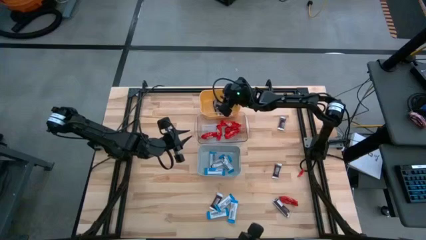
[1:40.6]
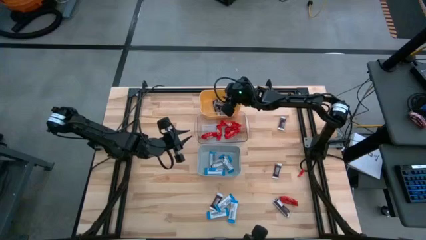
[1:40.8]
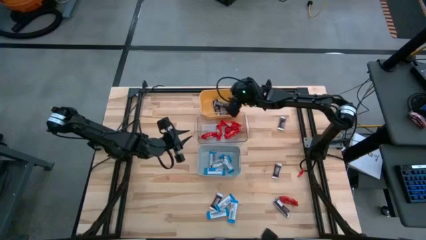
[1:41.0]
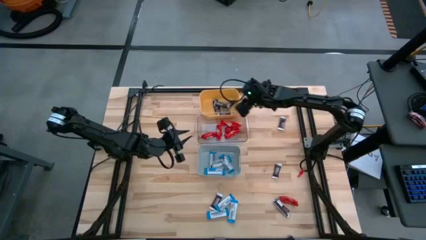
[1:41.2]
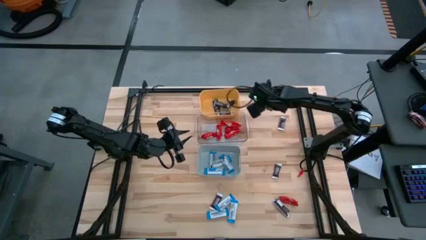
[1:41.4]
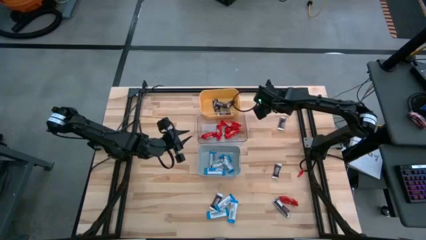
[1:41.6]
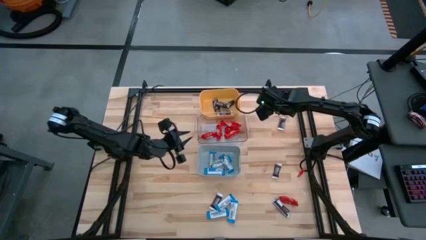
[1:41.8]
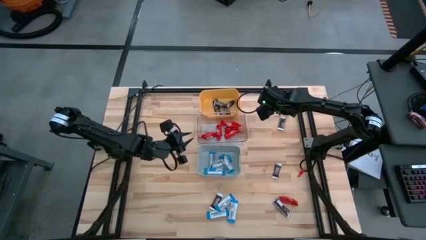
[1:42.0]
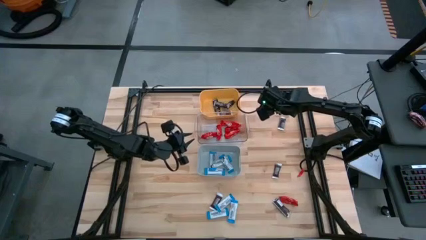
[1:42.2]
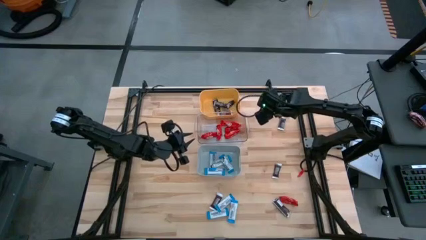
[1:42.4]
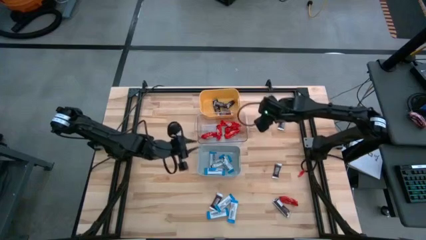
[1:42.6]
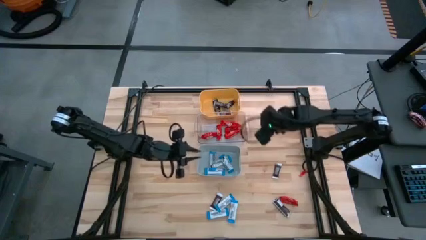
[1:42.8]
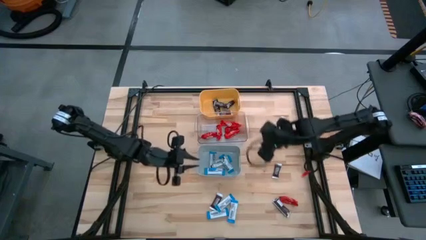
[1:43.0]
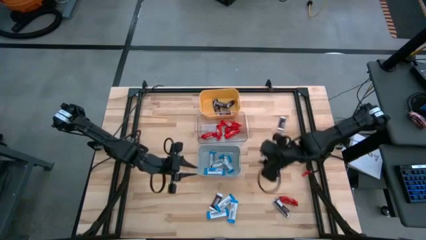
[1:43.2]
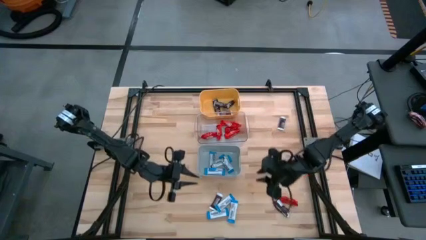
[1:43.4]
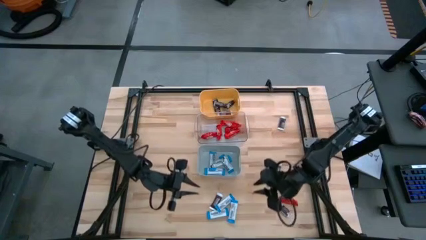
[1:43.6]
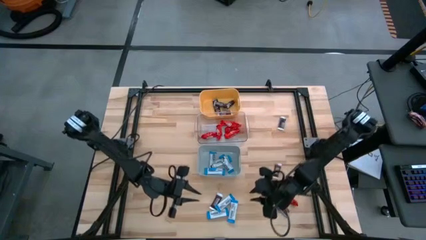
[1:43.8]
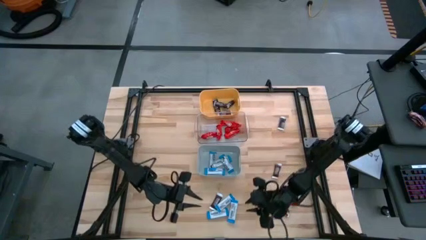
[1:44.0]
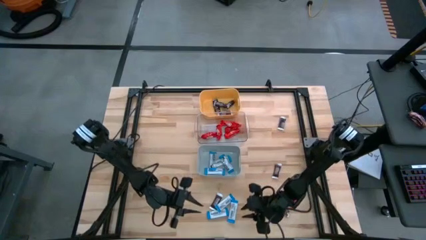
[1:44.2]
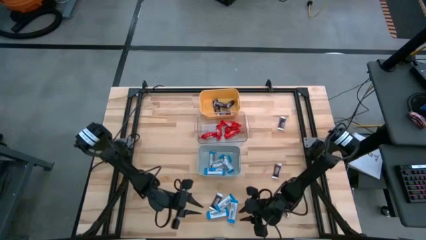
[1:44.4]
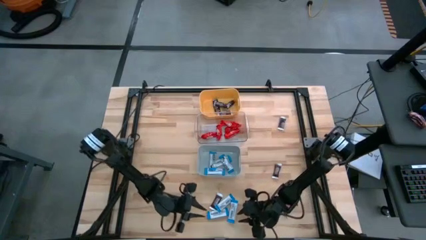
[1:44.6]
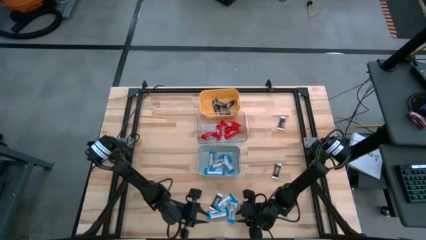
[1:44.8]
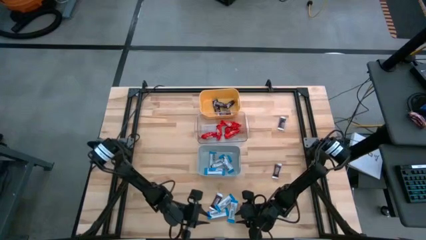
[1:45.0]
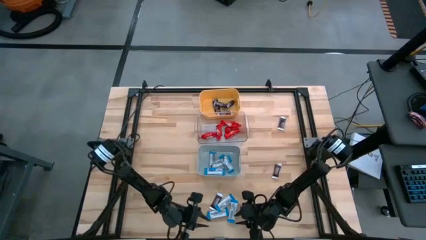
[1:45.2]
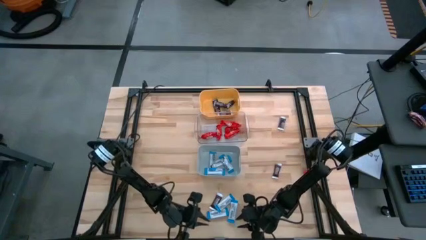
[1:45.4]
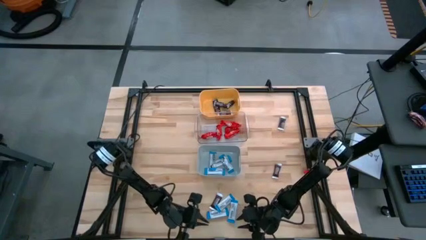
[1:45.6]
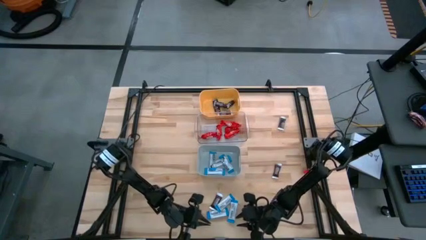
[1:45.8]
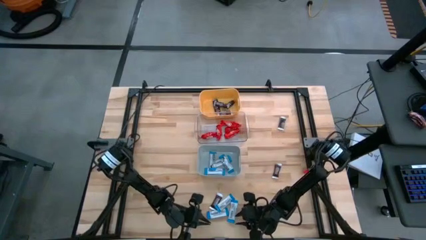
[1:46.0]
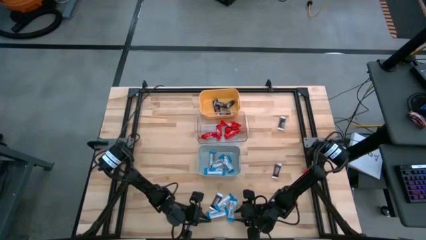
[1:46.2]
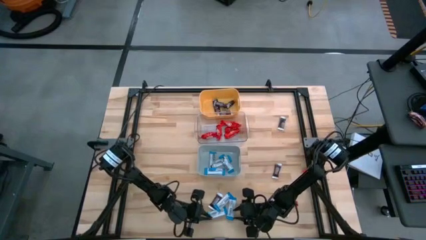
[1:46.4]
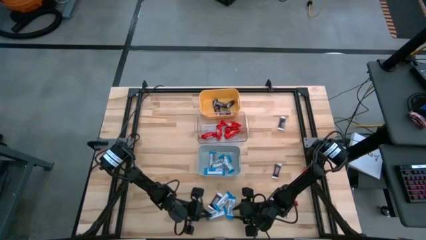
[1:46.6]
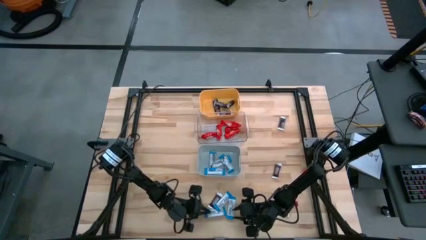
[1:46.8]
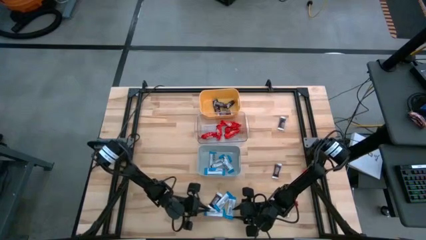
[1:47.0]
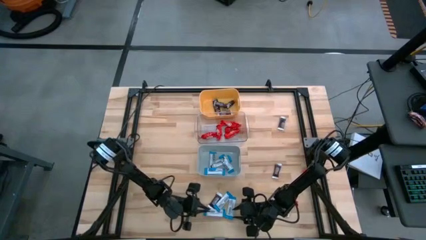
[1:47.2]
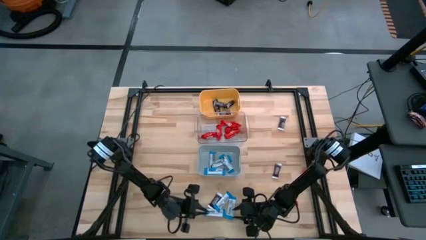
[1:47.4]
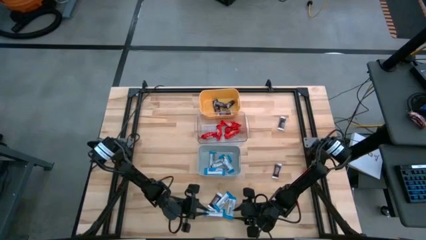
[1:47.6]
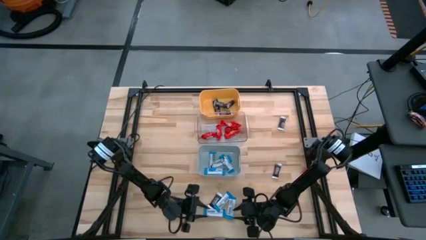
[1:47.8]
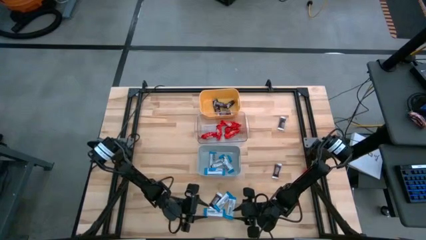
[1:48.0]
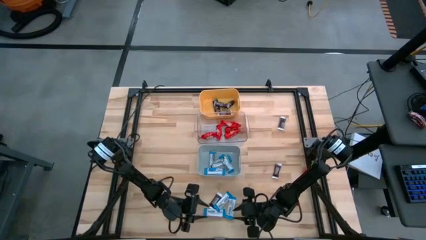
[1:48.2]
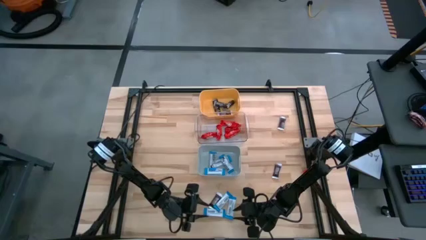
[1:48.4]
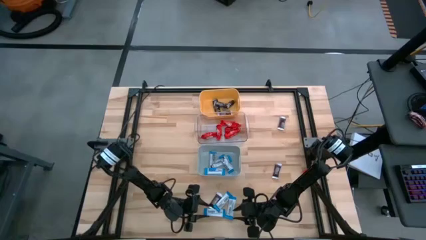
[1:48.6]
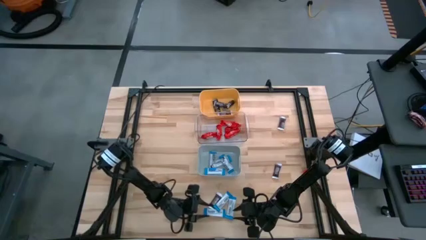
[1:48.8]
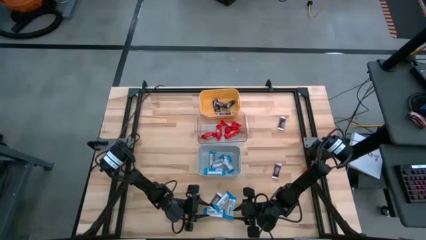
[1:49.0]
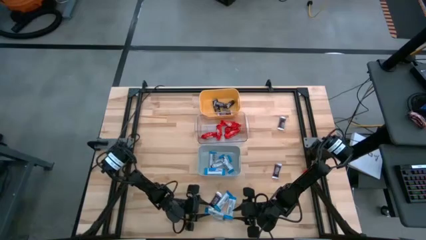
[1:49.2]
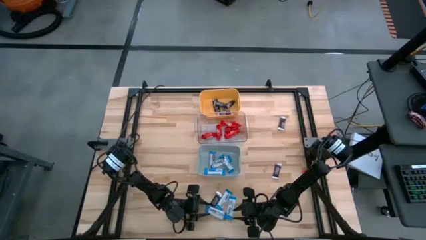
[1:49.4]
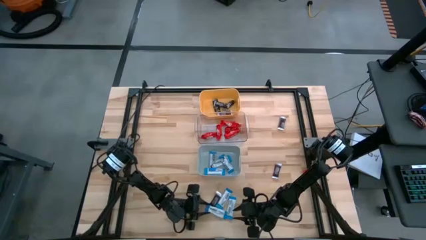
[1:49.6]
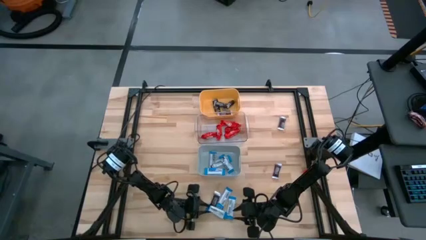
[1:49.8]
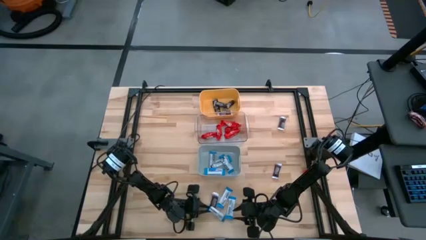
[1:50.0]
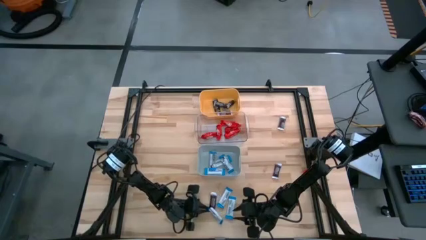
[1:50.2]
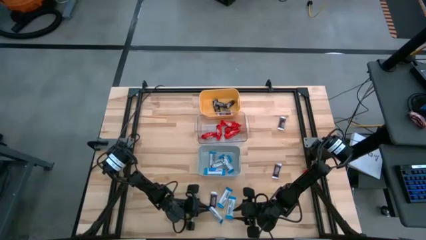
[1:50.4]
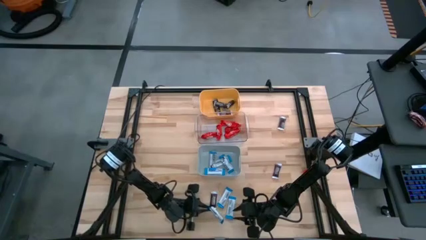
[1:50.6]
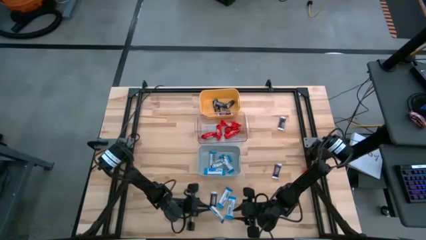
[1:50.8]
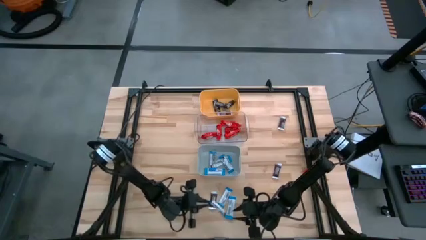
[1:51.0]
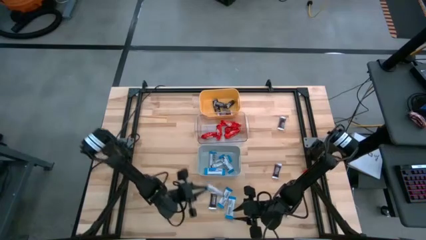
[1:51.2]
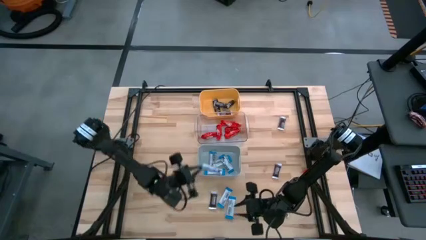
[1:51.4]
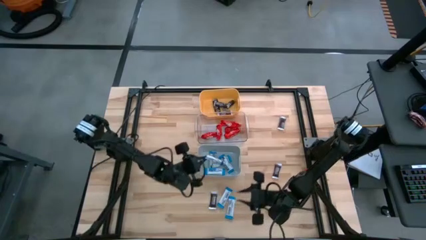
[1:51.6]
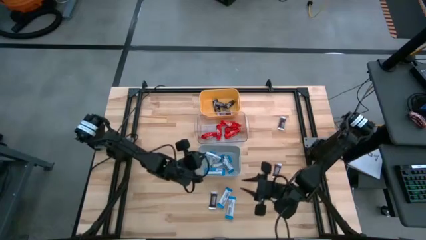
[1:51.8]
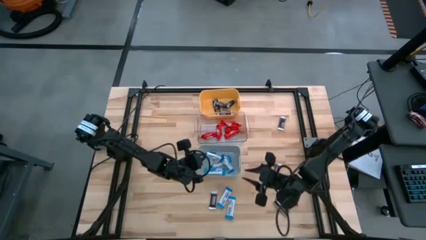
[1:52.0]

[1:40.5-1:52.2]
Task: Organize candy in baskets
Put the white chocolate bar into the gray bin

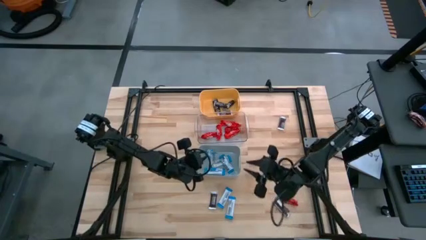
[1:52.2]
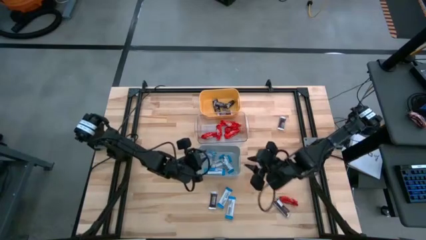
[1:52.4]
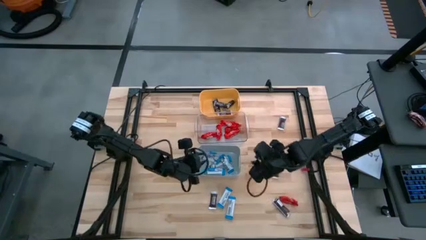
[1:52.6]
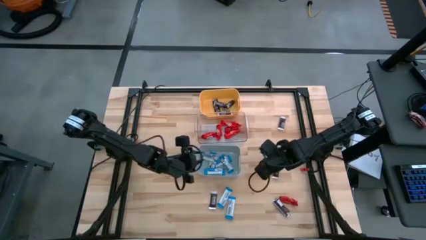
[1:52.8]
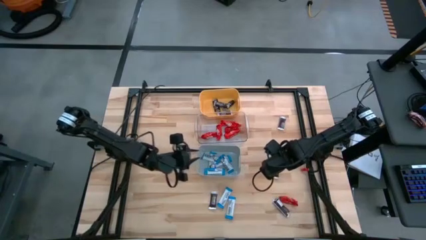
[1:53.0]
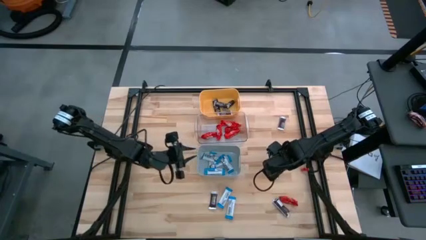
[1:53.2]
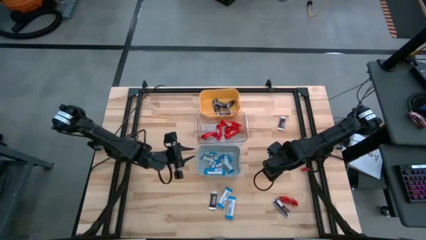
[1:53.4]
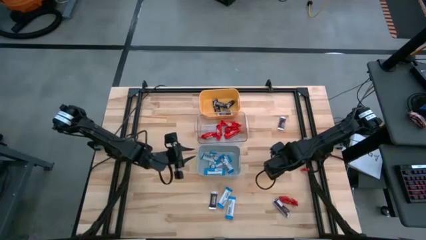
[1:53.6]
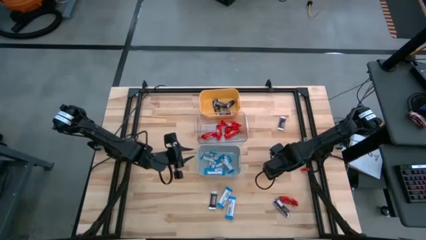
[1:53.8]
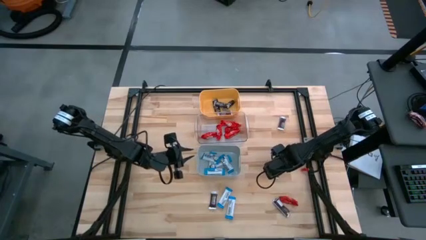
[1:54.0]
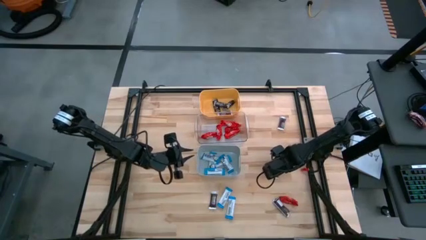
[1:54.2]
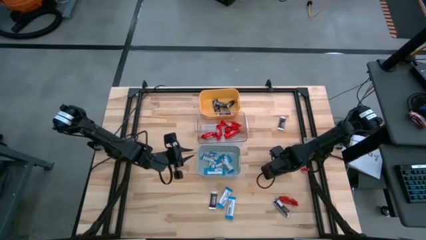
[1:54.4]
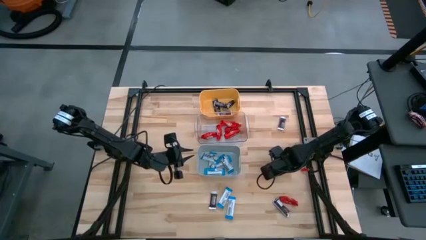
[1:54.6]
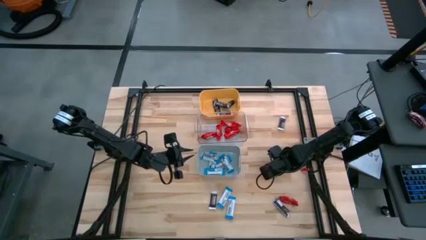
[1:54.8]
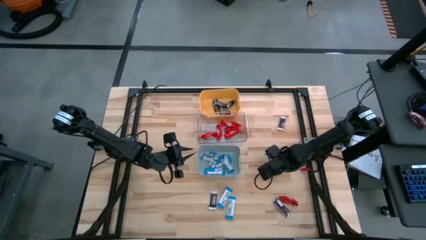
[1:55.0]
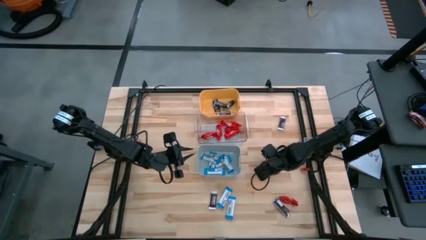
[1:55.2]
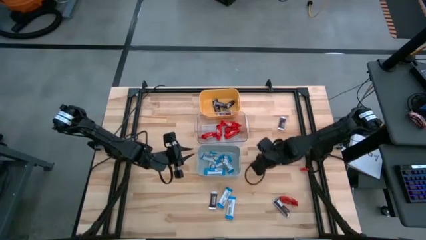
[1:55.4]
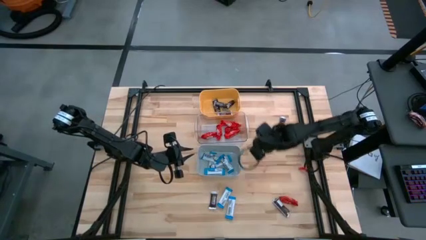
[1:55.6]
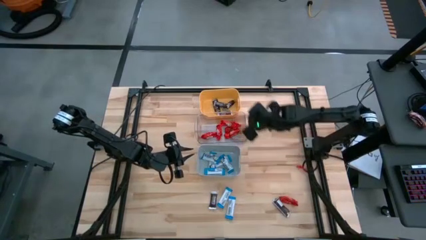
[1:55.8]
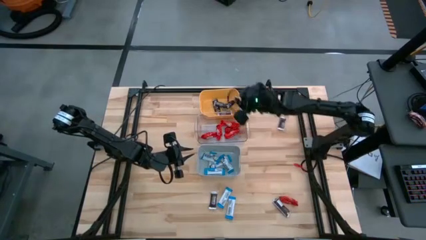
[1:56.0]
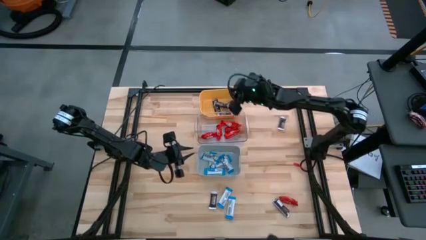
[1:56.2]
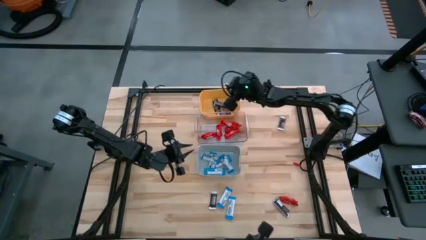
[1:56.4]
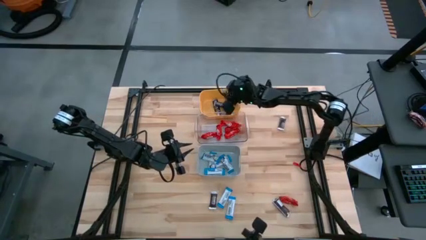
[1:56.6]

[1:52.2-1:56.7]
Put the brown chocolate bar into the yellow bin

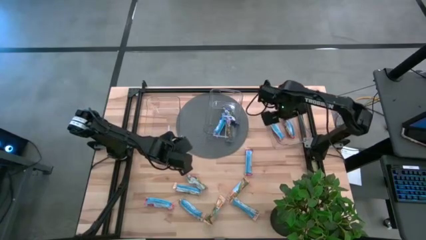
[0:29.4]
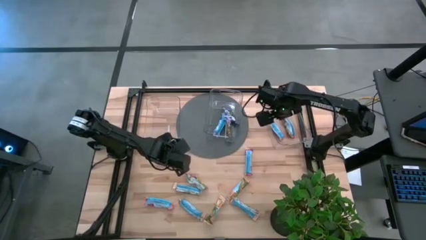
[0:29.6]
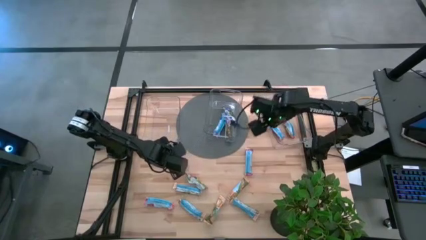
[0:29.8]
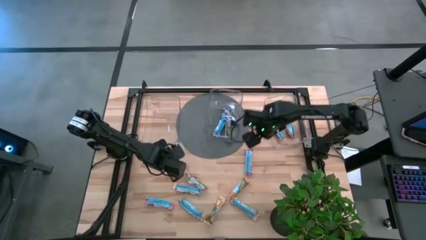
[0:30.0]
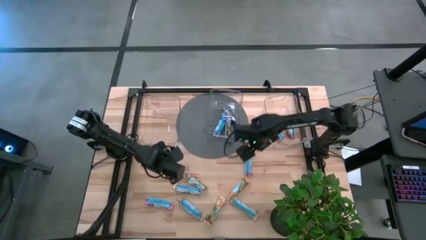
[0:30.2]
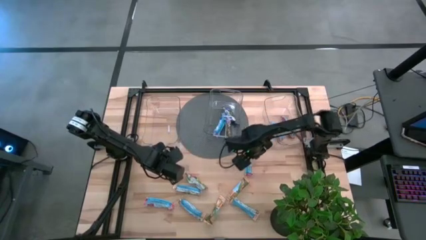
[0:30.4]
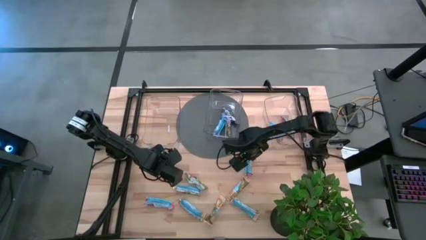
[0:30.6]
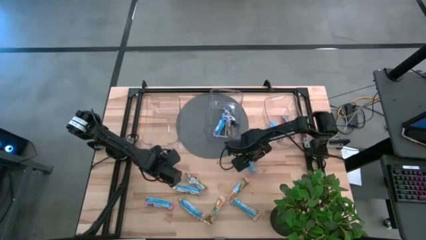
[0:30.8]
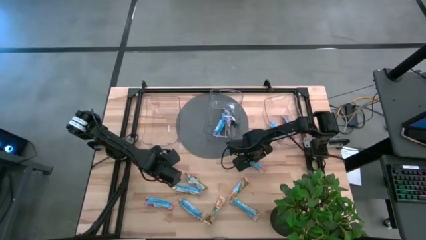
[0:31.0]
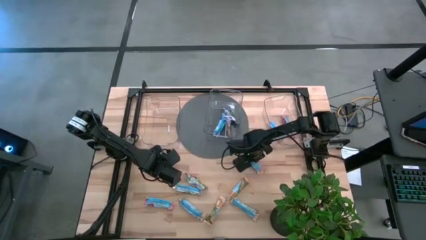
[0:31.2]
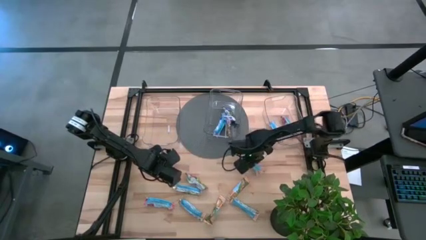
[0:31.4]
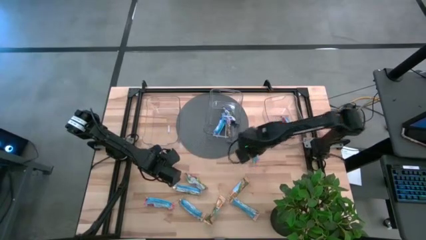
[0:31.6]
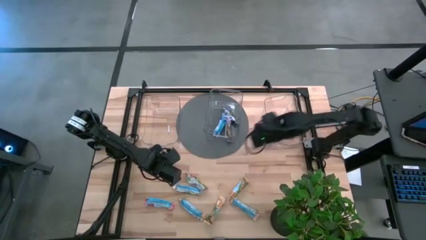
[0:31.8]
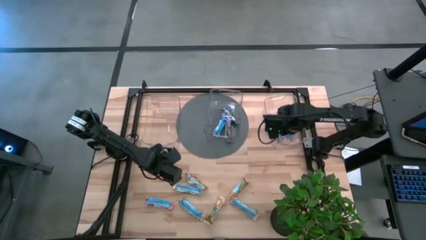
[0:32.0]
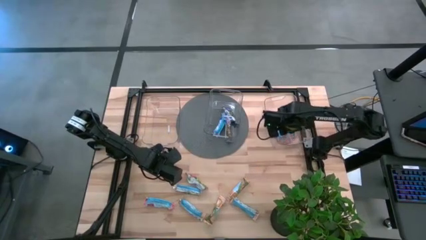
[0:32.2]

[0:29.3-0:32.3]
Task: Pick and place Granola Bars by type
Put the red granola bar into the right transparent bin
